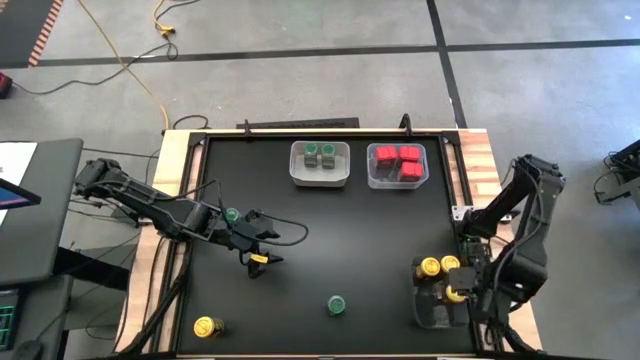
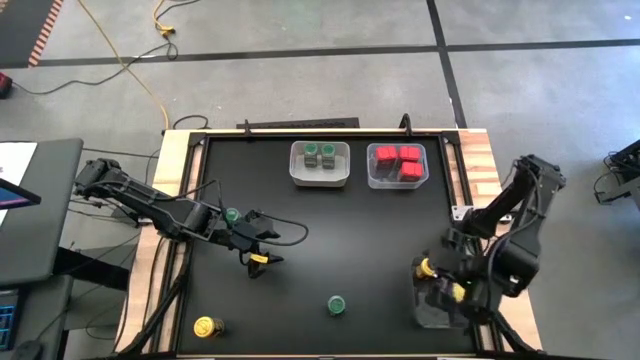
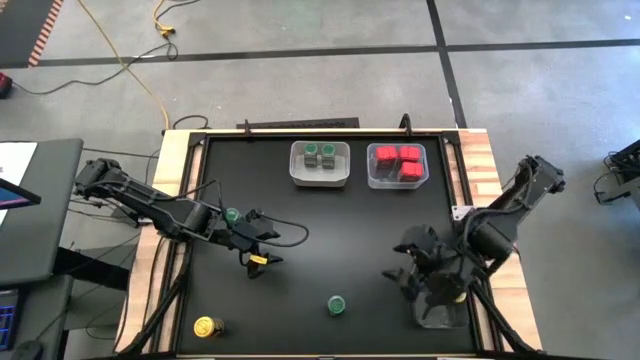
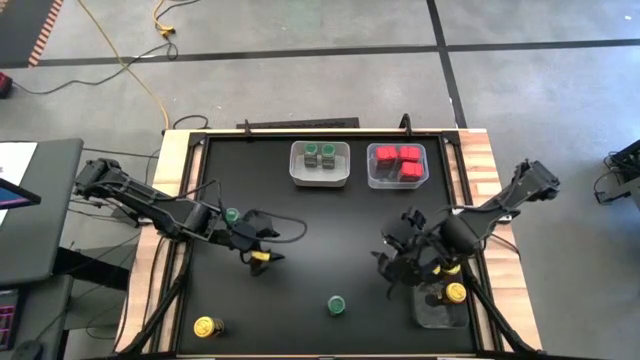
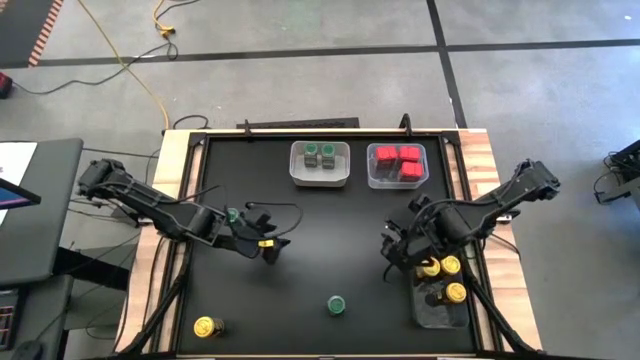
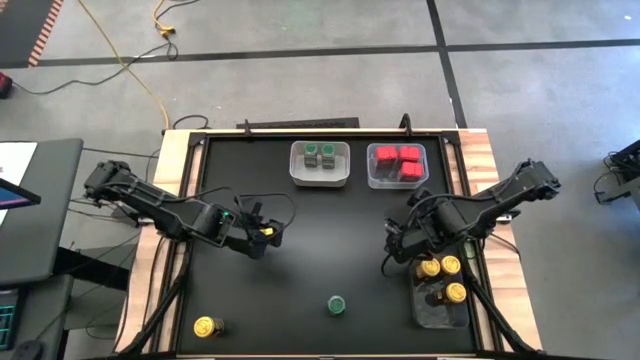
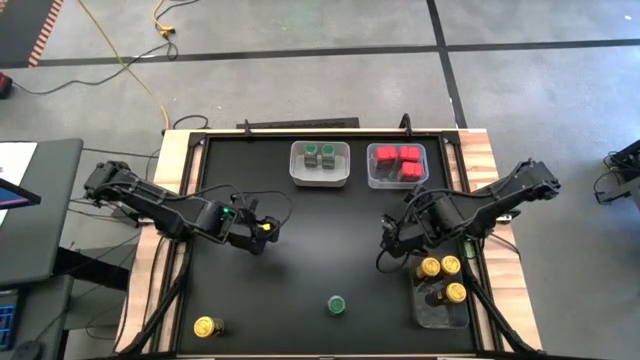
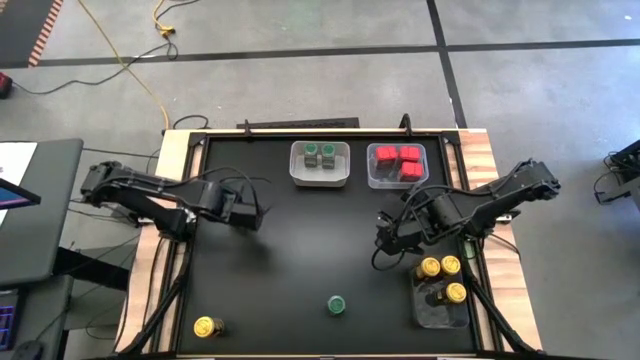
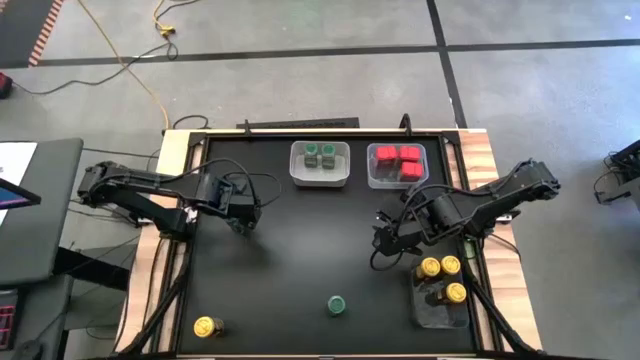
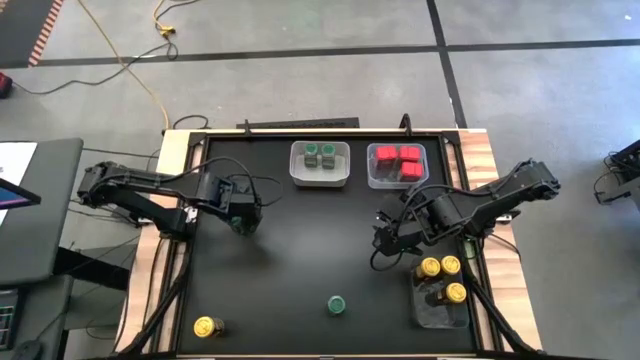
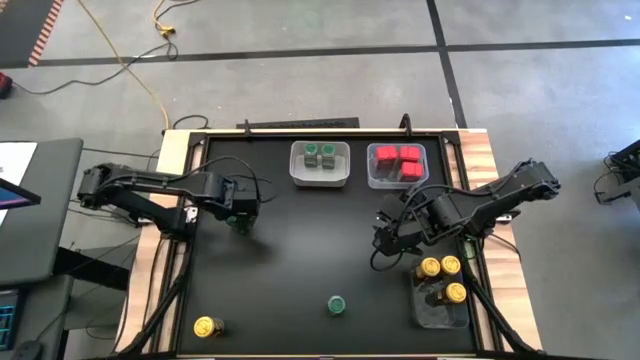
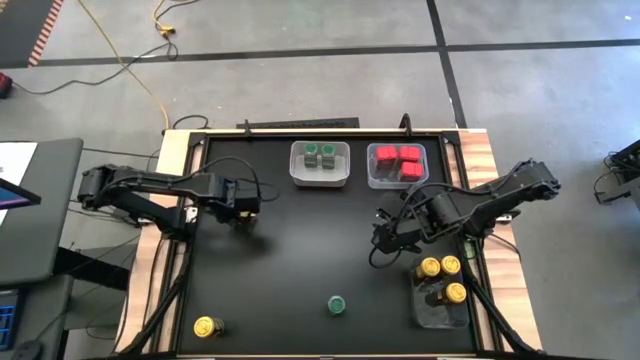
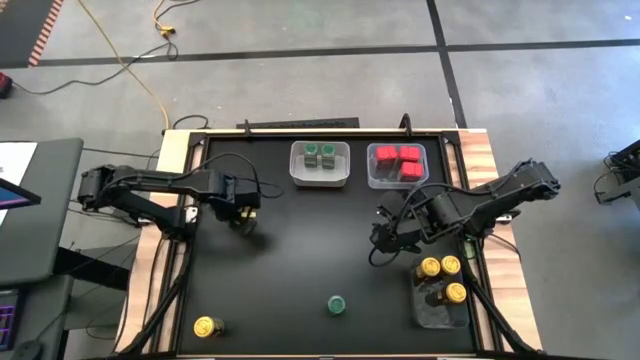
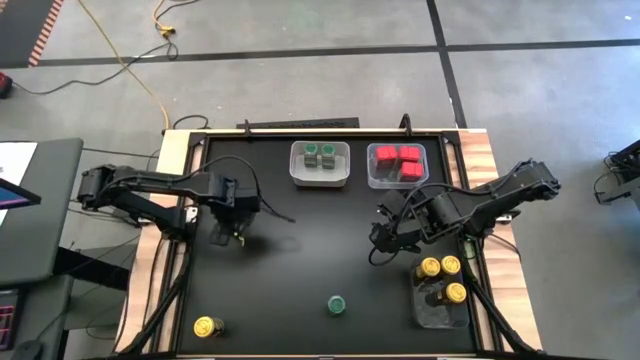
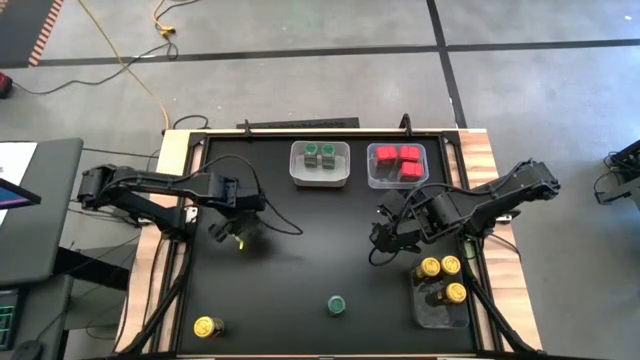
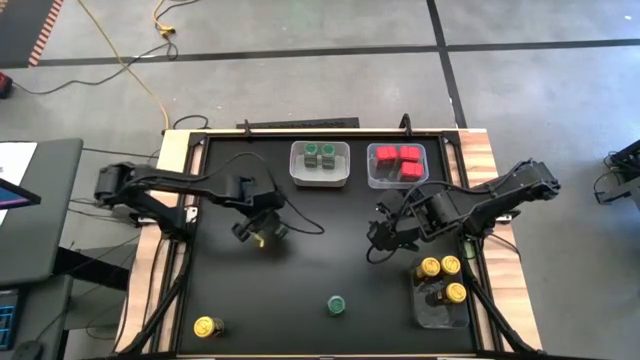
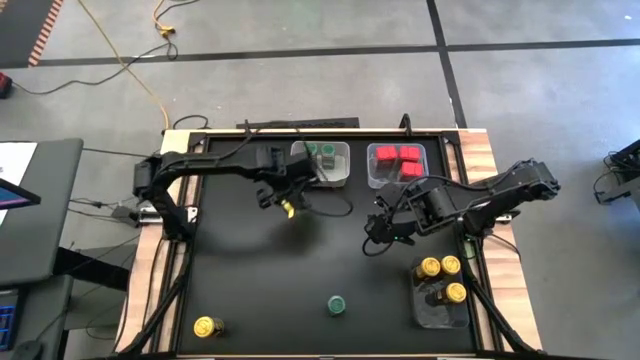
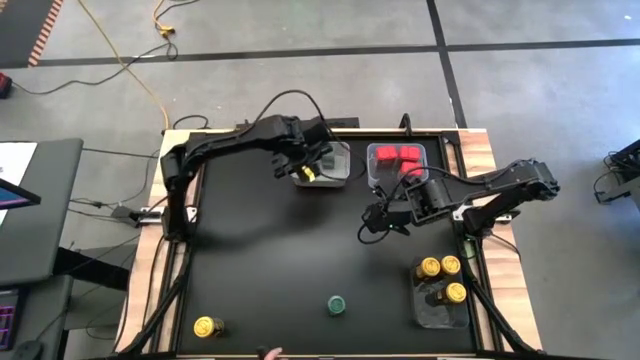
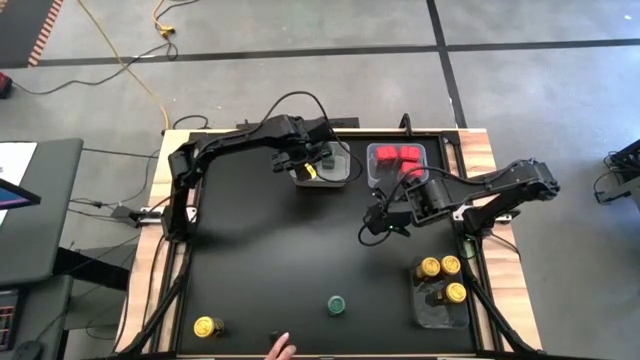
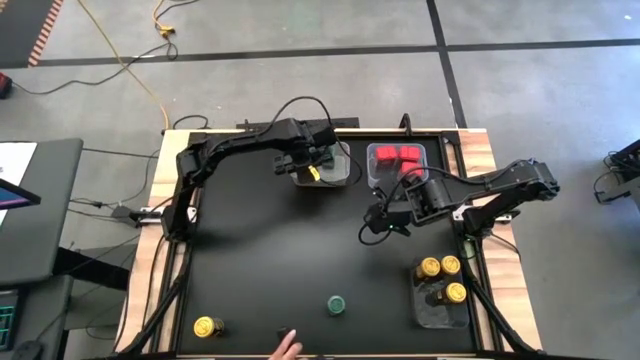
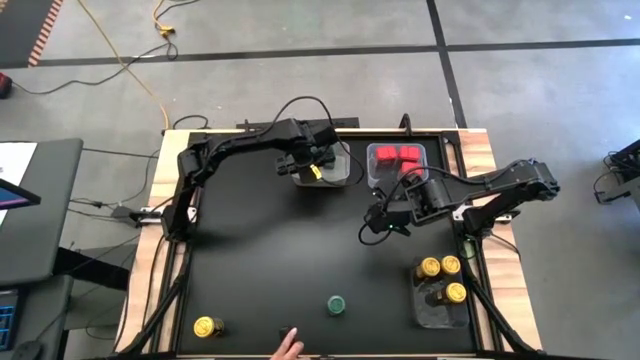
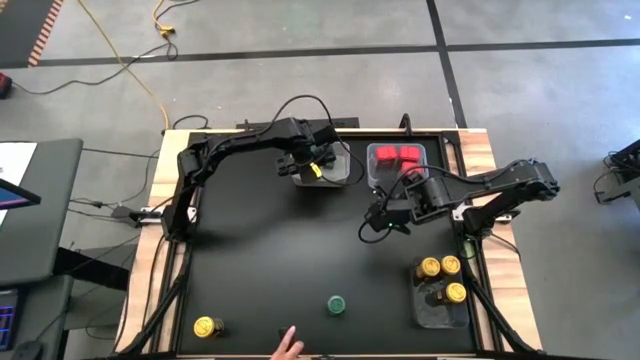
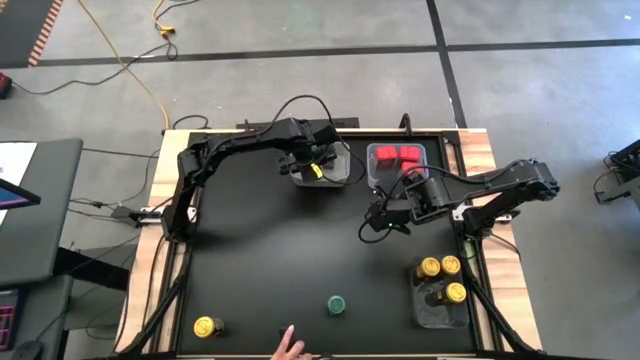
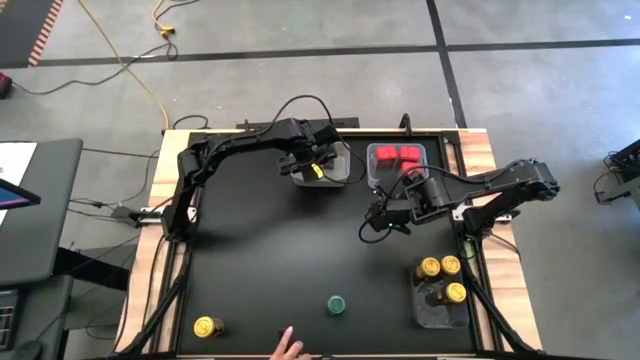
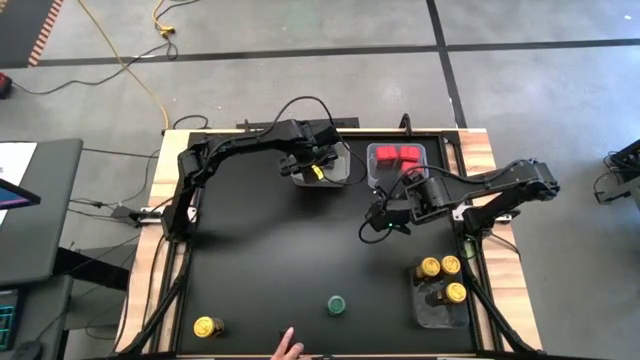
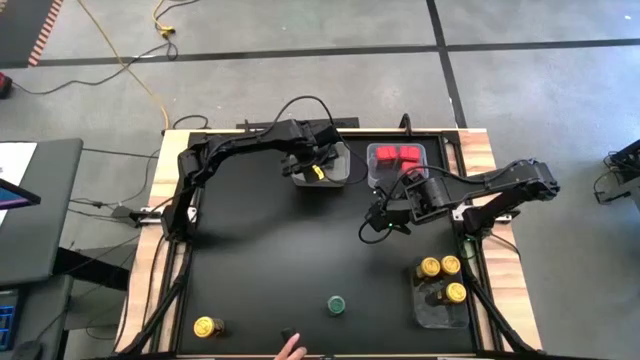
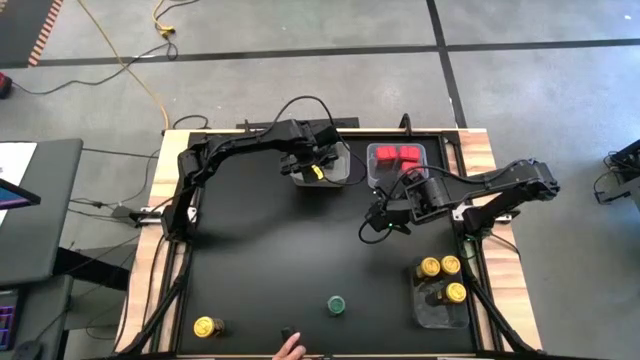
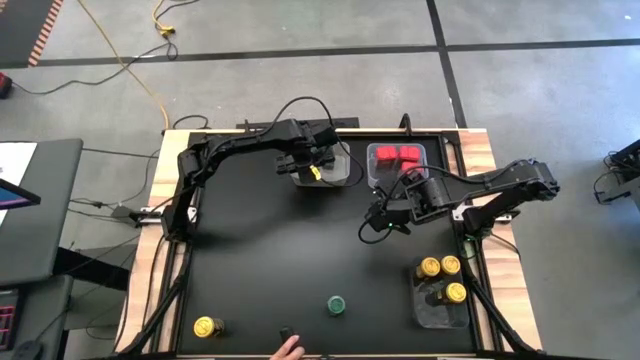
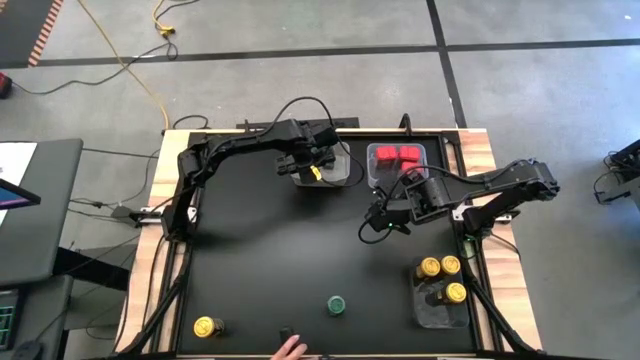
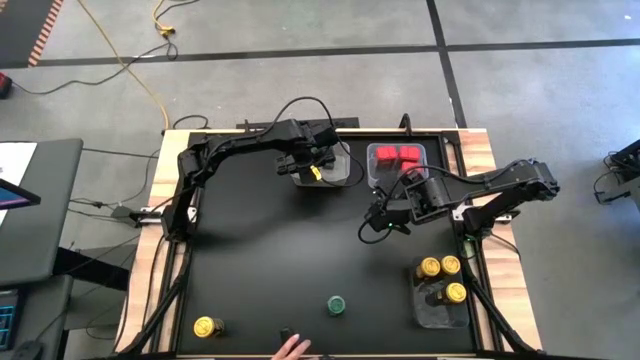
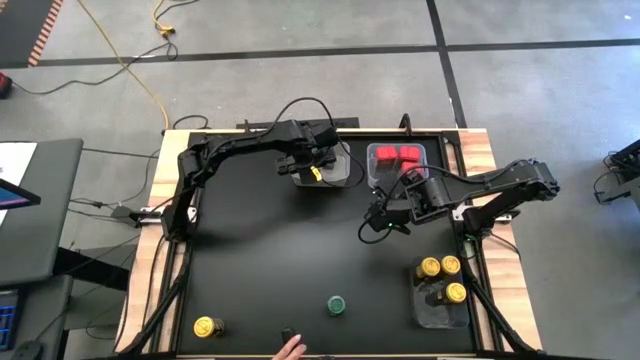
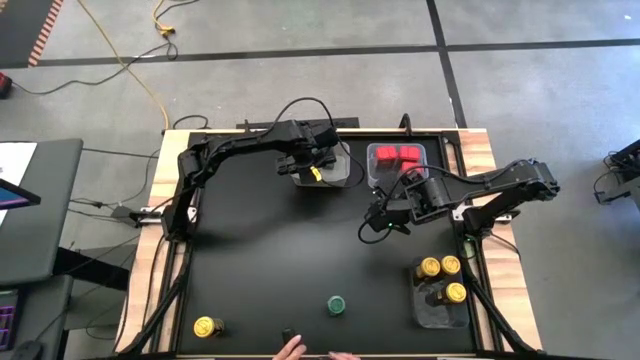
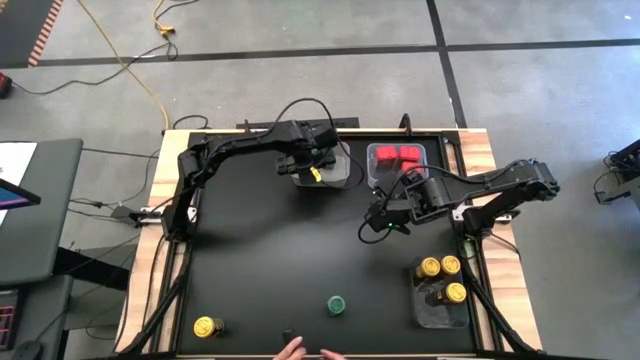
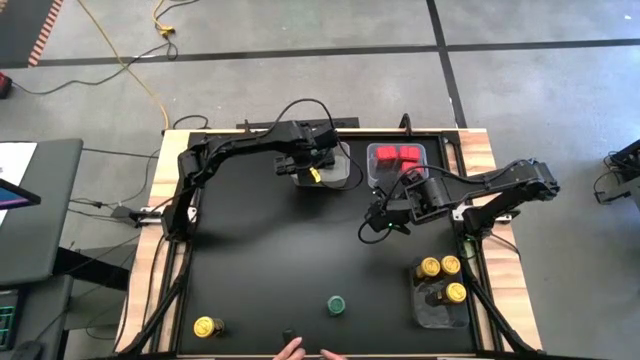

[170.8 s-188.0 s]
Task: Sort spices by type
Put the top green seasoning bottle into the white bin

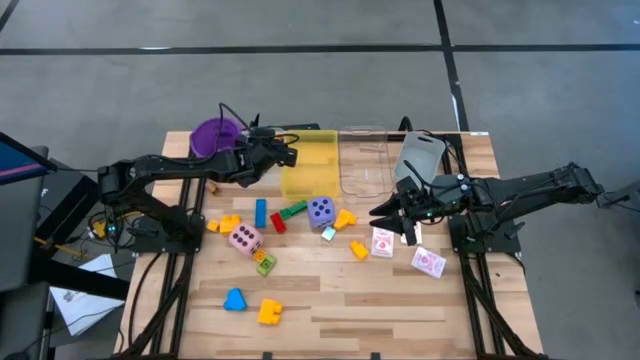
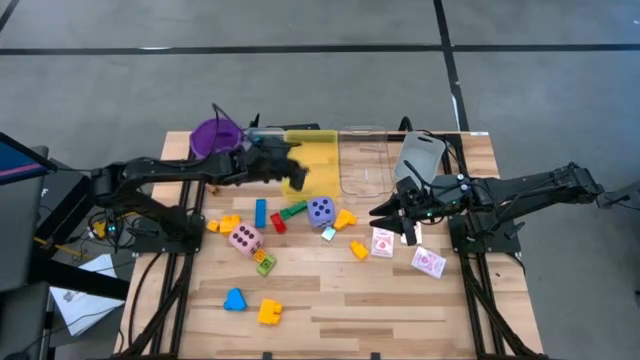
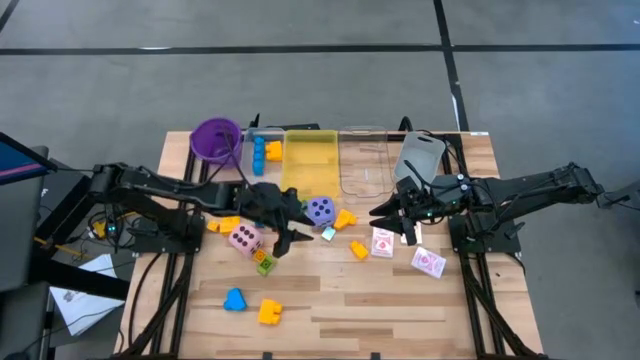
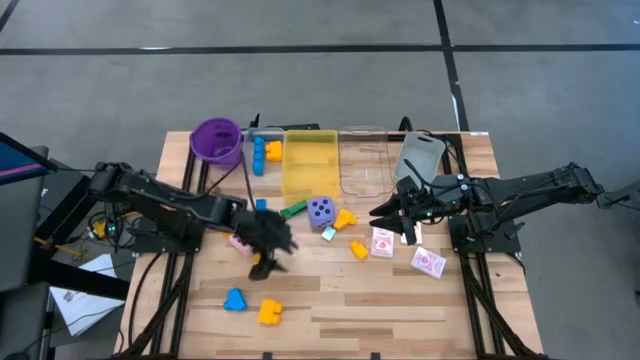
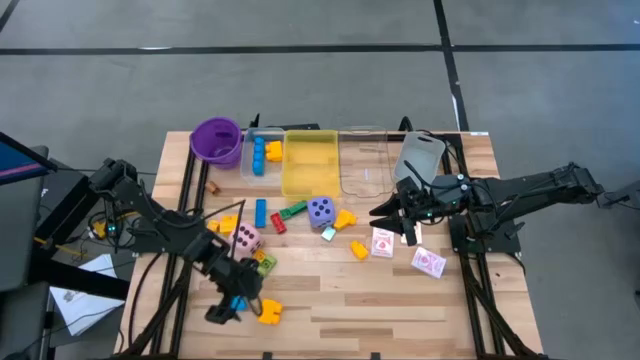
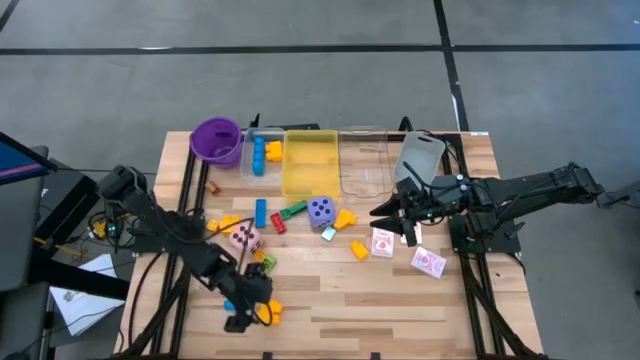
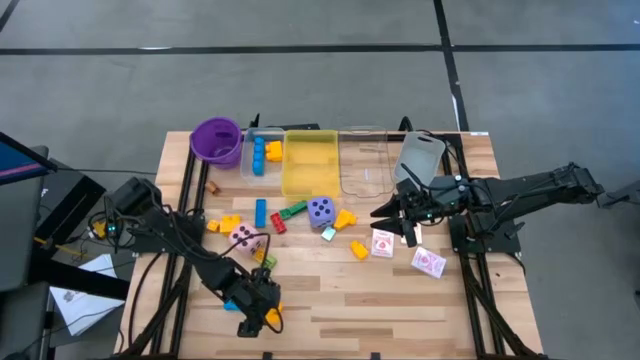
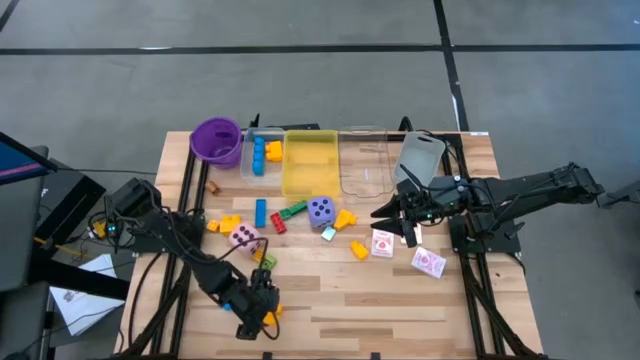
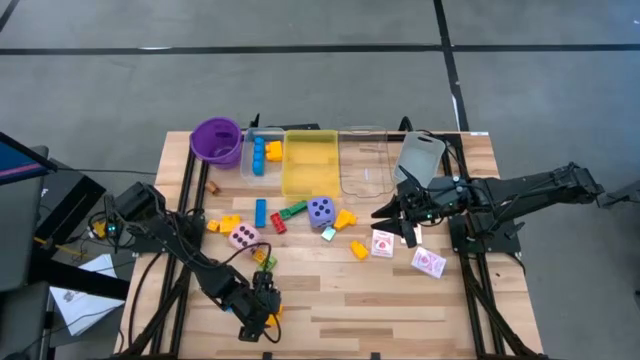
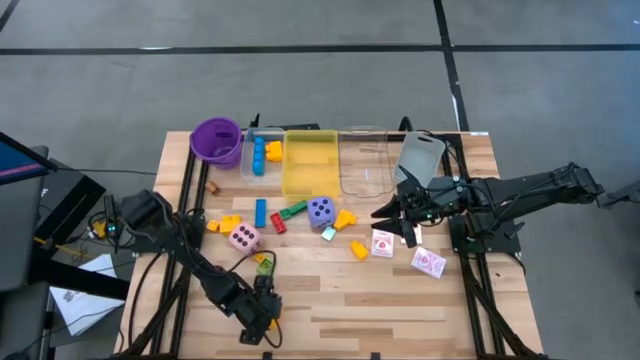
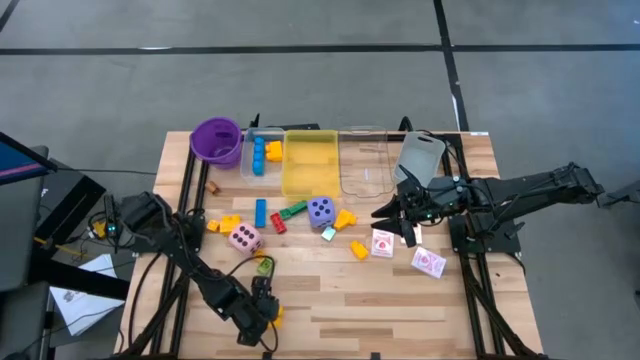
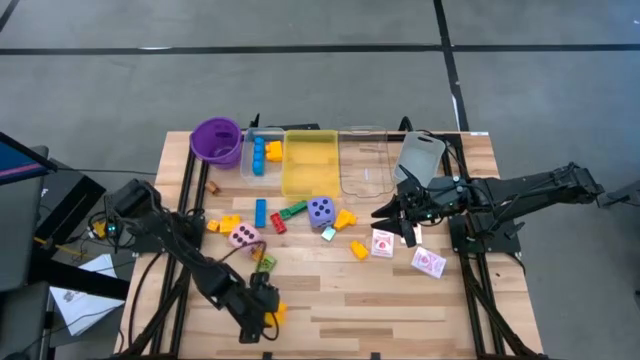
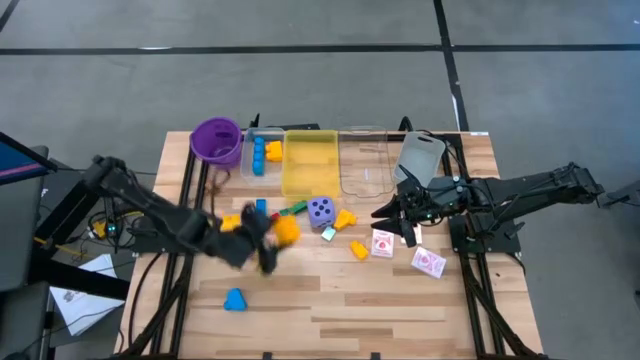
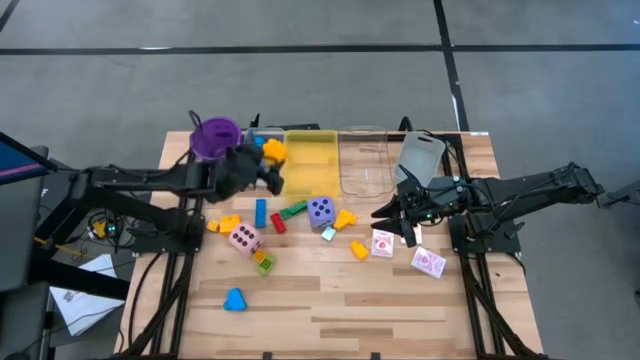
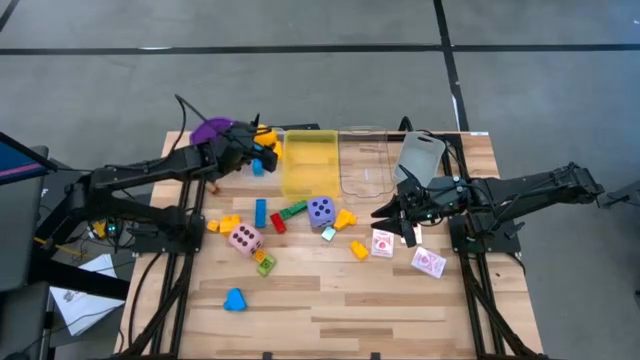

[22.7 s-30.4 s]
Task: Pick & Place Toys
Put the yellow stud game piece into the left transparent bin
